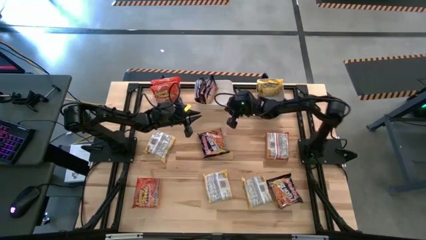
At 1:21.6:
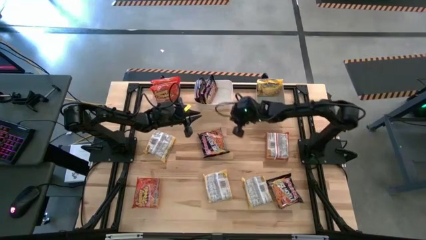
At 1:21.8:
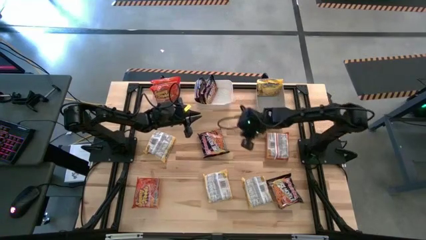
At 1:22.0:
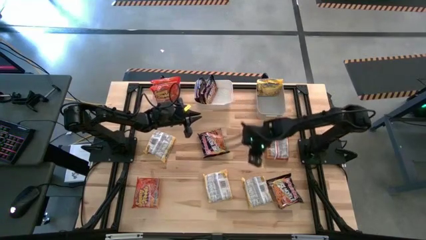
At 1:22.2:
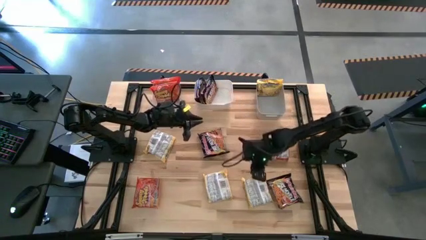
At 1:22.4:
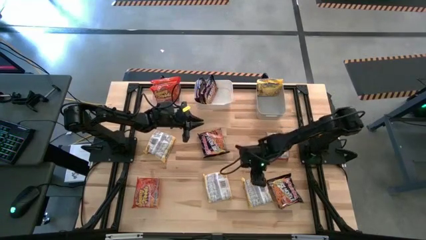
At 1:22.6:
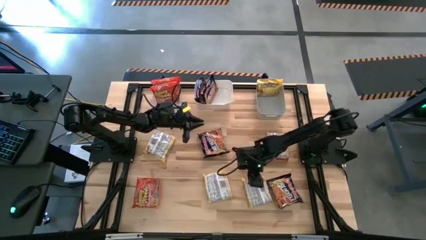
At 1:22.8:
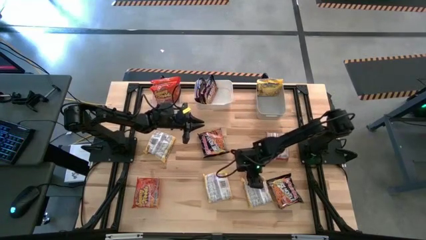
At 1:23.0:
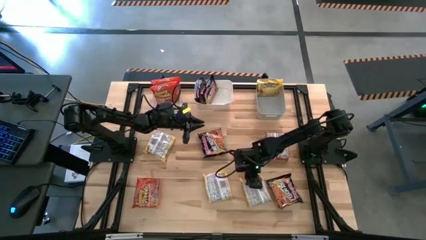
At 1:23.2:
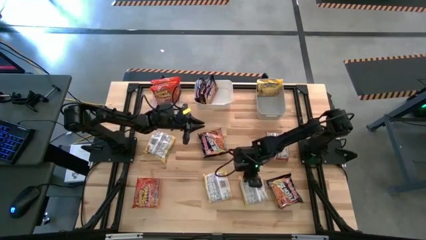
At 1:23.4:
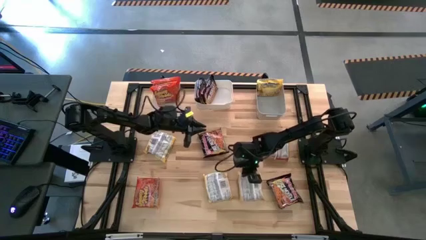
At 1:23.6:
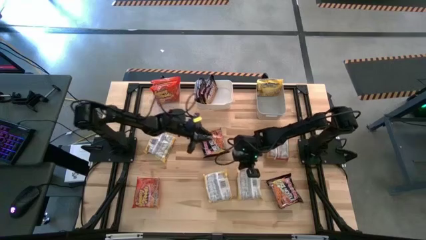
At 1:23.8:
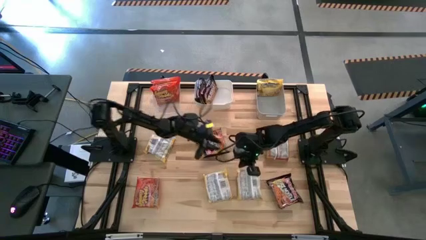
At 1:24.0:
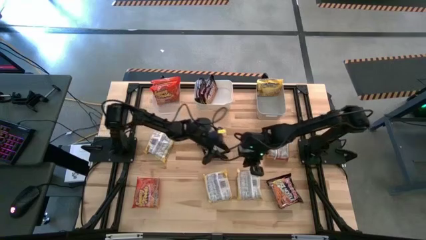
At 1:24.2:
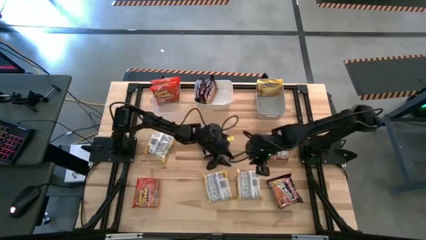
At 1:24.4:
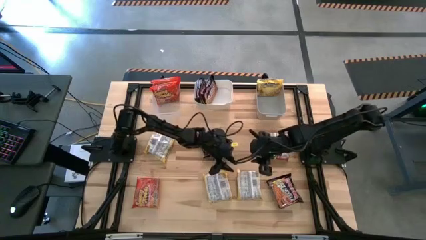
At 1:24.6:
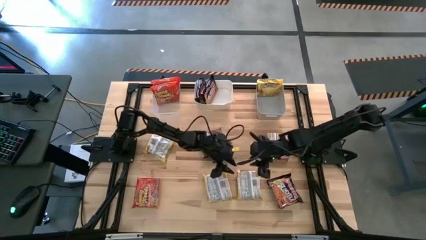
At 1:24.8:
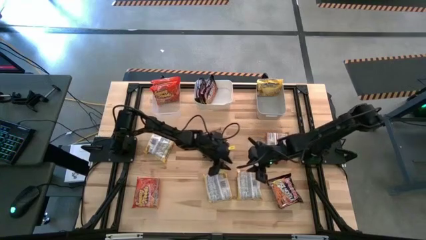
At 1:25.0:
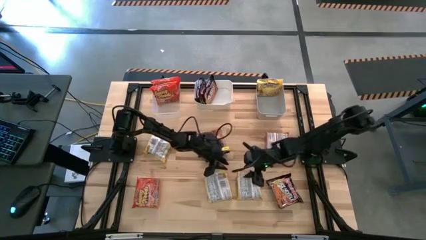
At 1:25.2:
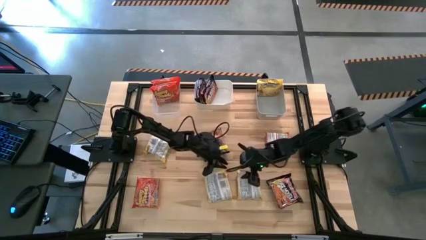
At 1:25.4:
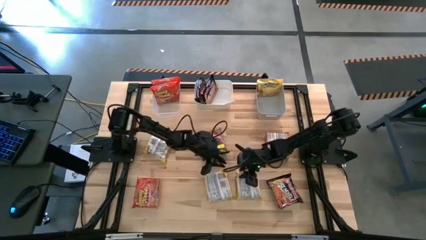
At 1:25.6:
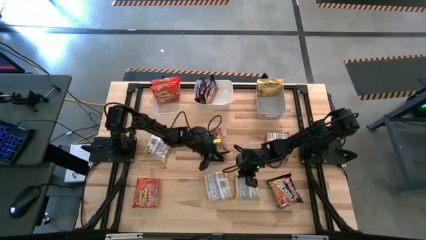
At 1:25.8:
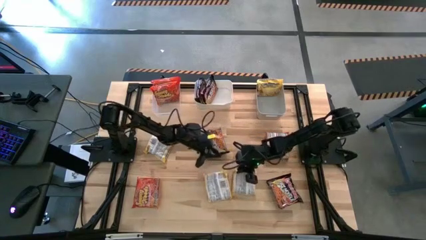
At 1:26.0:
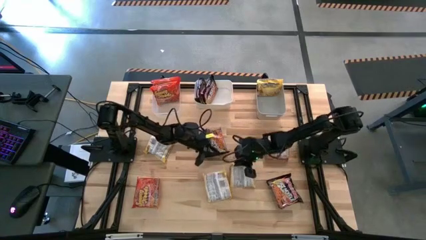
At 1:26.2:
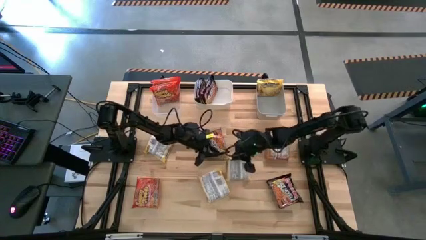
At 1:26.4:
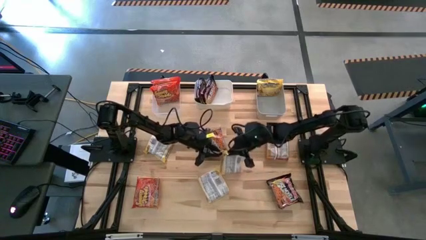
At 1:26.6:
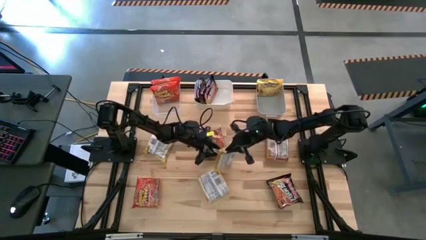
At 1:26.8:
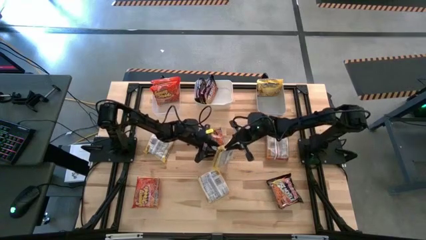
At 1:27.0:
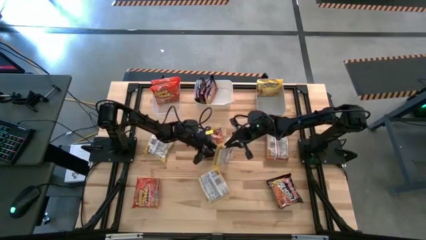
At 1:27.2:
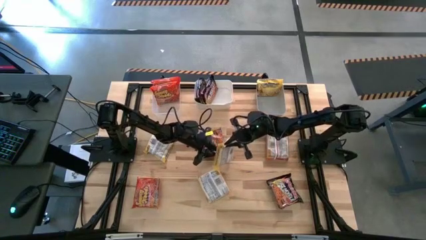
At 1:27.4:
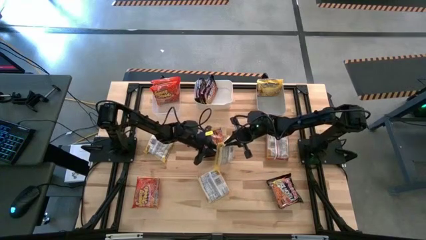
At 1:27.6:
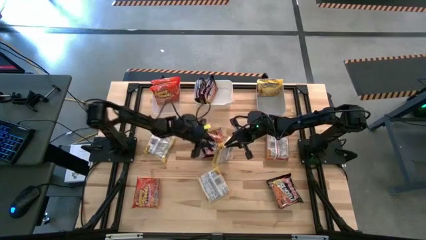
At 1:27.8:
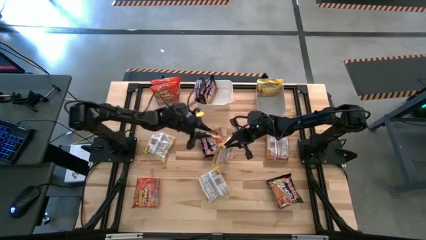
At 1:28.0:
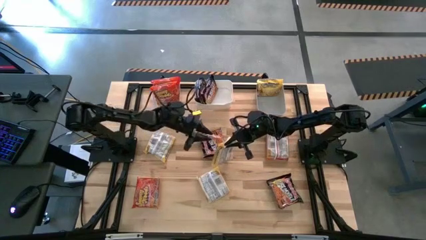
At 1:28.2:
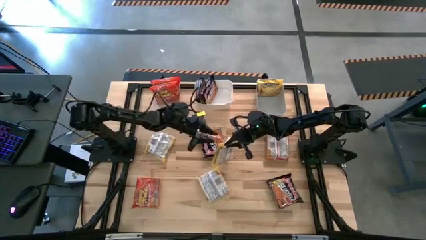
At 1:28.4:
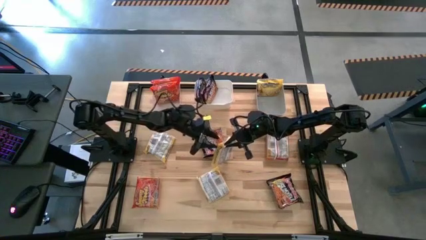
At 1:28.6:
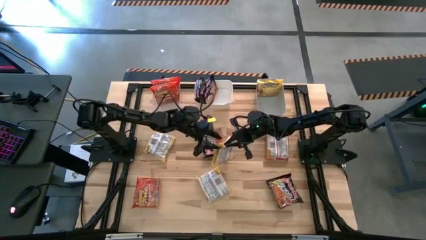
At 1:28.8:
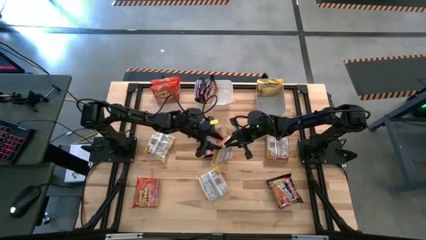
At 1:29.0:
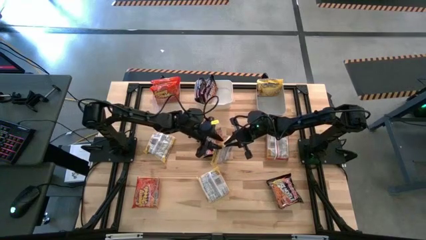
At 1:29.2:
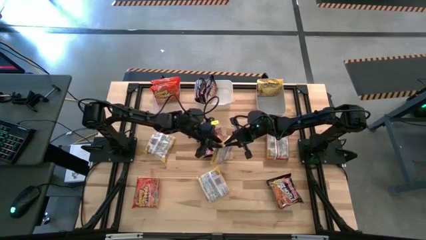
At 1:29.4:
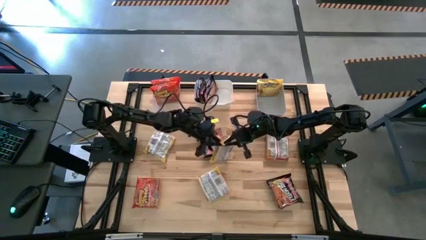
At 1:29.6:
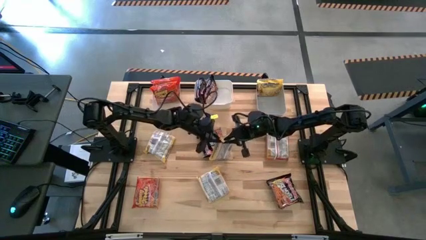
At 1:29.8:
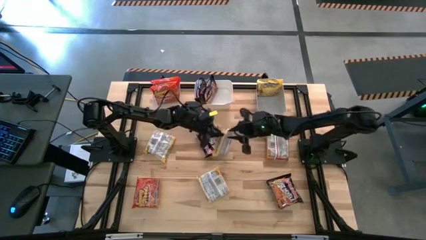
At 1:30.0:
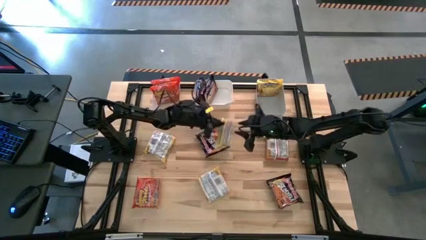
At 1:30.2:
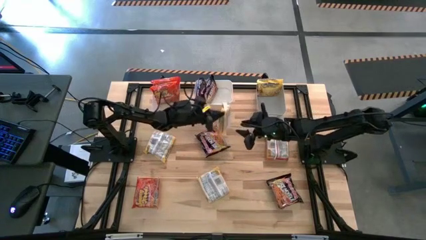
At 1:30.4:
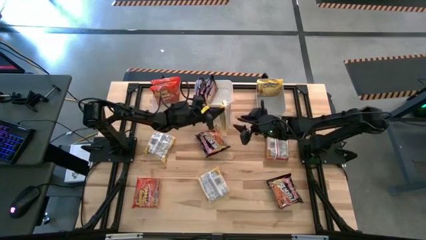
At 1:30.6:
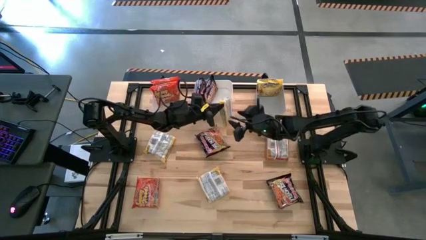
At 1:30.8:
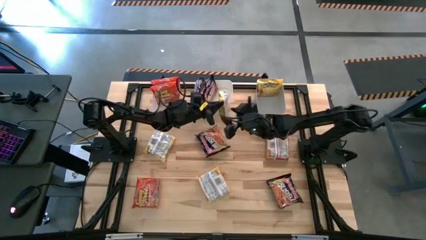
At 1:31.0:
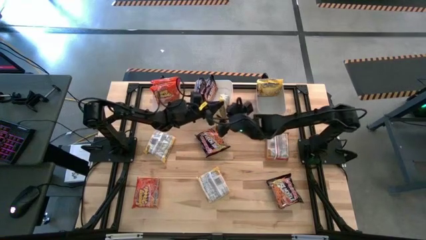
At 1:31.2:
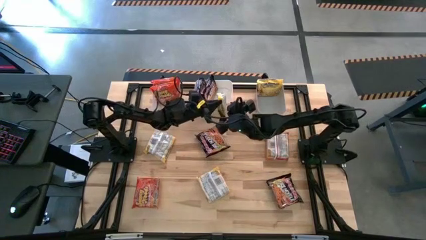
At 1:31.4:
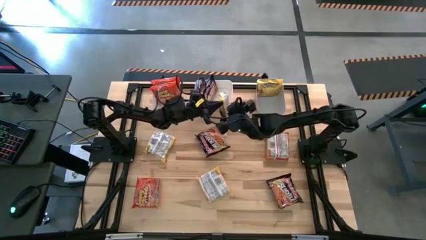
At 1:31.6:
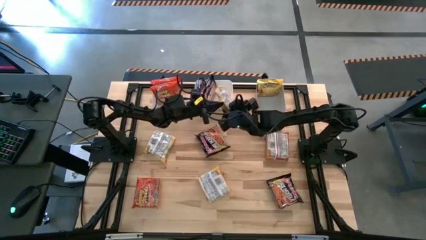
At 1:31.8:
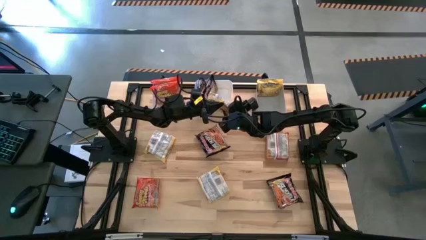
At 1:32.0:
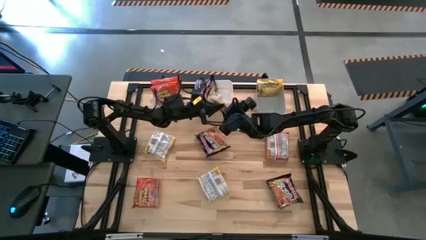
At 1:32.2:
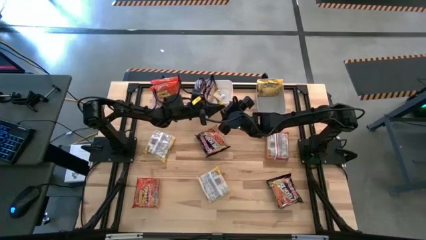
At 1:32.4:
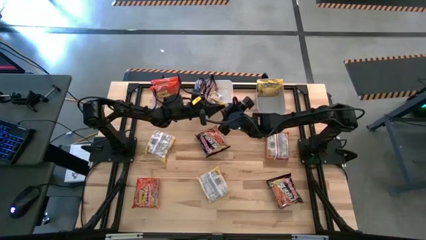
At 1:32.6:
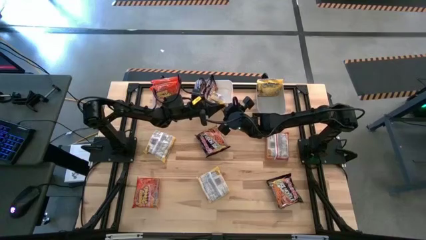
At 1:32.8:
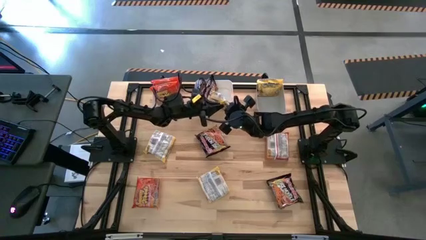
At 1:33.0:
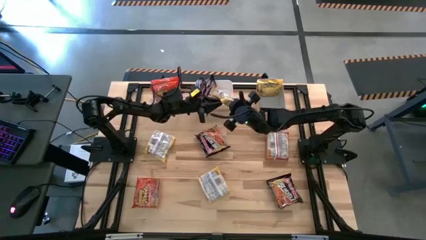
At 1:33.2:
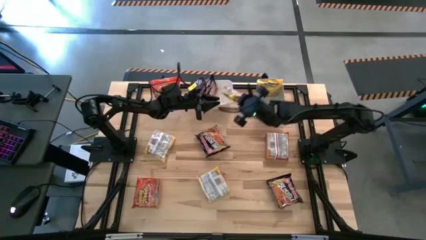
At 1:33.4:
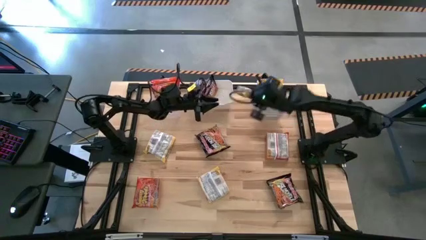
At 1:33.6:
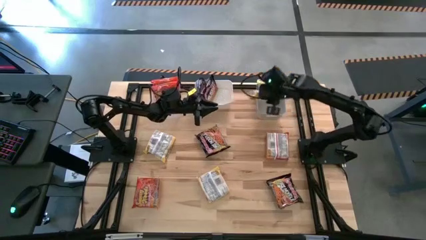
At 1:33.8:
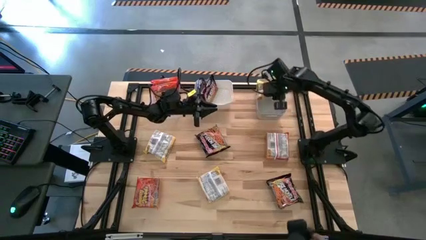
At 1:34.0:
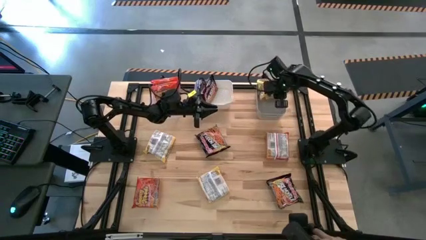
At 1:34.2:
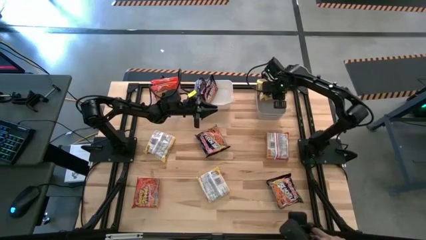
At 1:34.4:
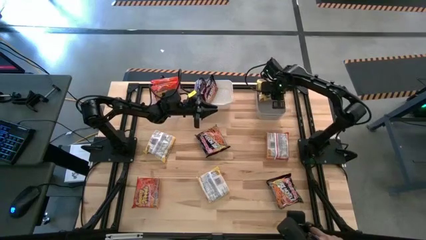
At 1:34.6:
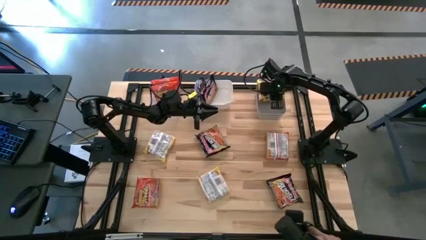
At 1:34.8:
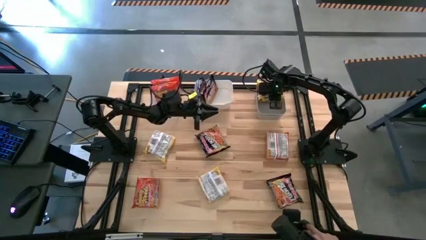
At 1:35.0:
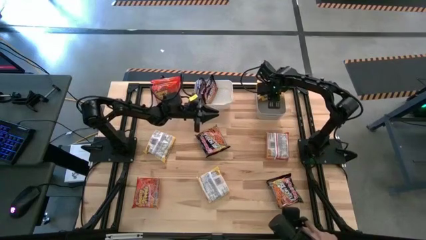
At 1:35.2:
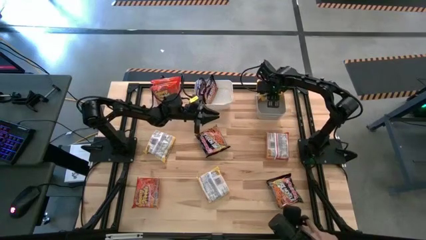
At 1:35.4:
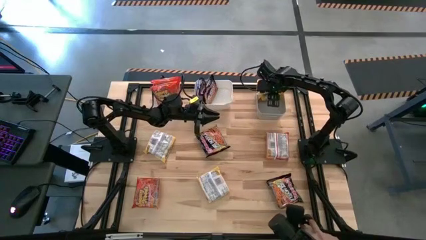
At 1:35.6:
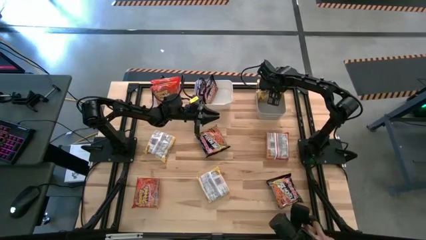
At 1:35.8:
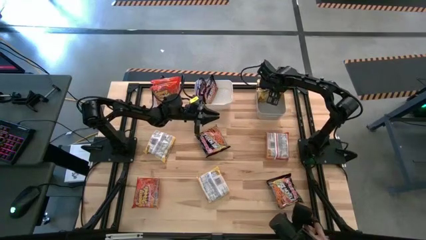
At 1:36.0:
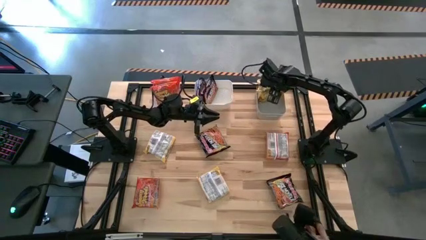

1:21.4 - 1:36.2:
Task: Sort Maruchan noodles
Put the yellow noodle pack into the gray bin

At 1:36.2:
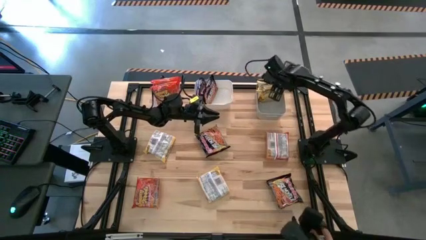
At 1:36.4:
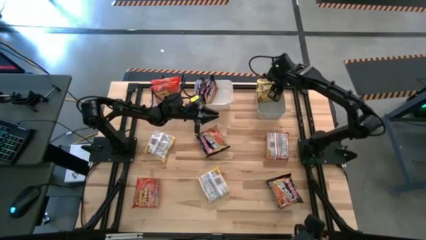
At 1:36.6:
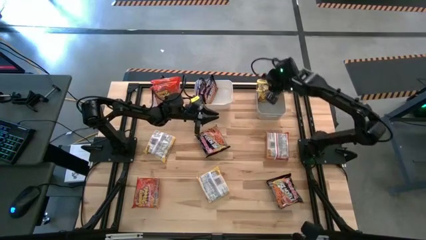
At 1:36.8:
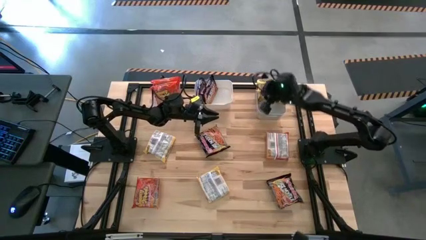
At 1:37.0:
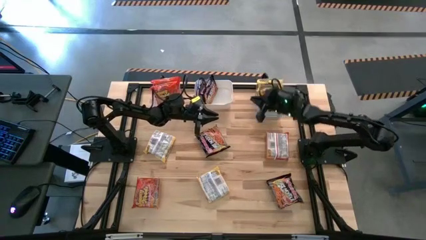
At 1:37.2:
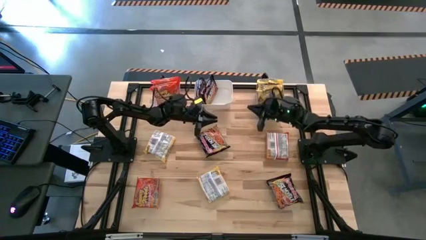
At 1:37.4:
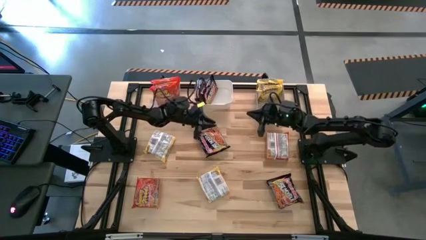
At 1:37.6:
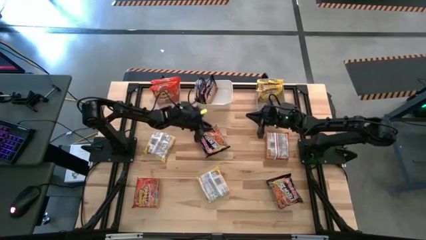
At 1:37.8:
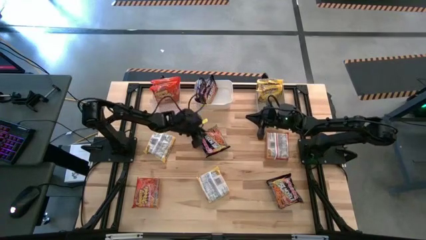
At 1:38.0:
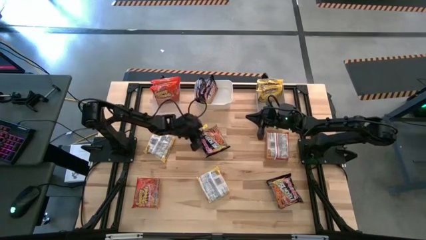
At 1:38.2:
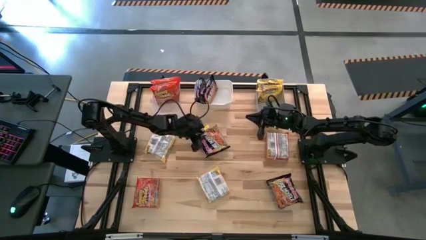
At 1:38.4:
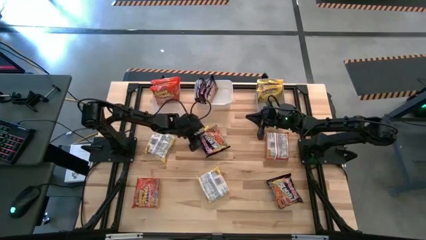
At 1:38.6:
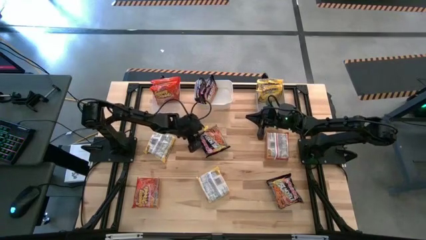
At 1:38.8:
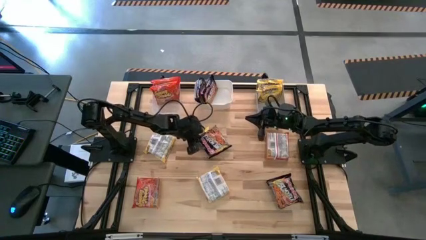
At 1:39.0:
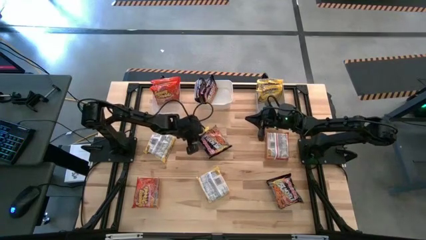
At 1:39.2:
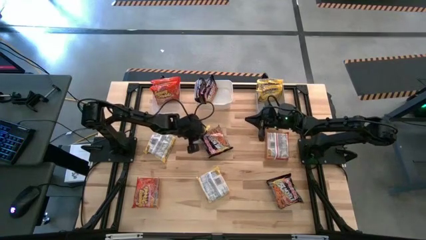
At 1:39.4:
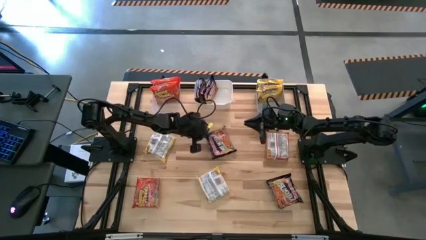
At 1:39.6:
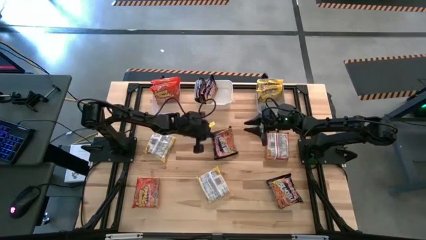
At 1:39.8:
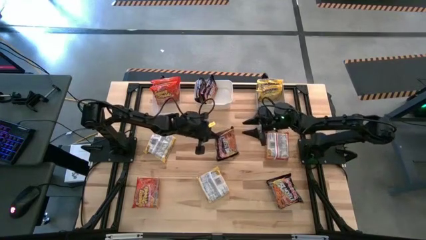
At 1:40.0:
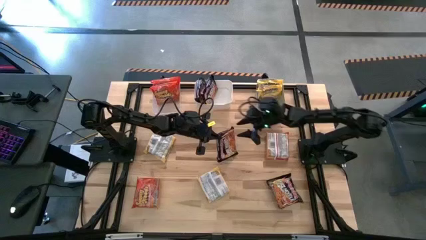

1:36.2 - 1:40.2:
Put the black noodle pack into the white bin
